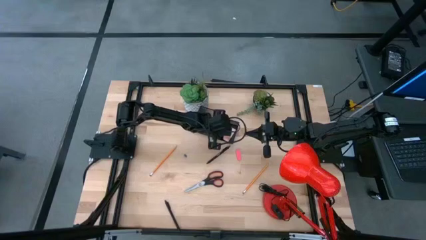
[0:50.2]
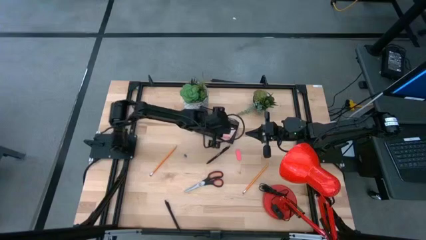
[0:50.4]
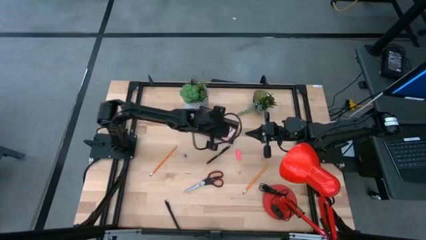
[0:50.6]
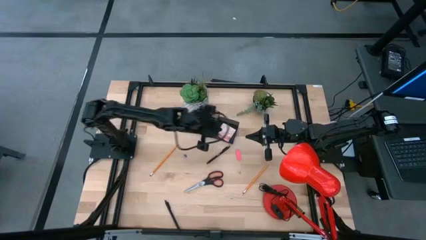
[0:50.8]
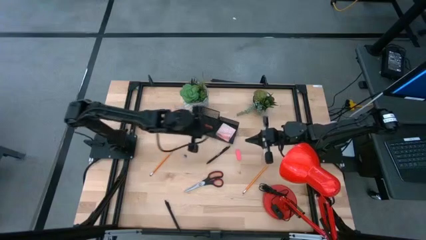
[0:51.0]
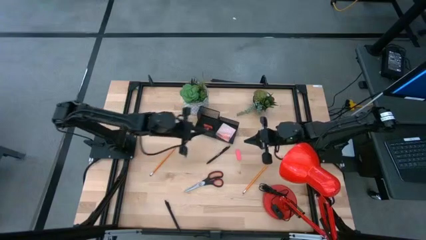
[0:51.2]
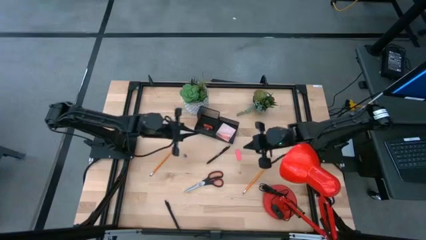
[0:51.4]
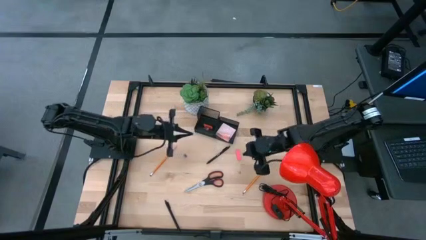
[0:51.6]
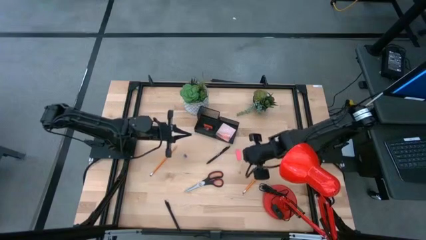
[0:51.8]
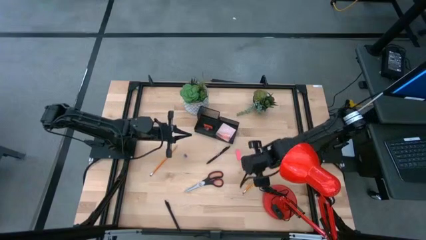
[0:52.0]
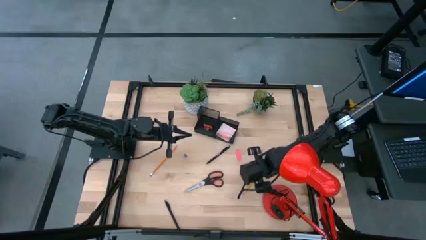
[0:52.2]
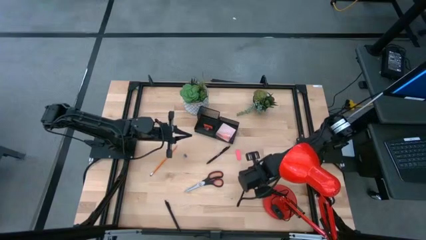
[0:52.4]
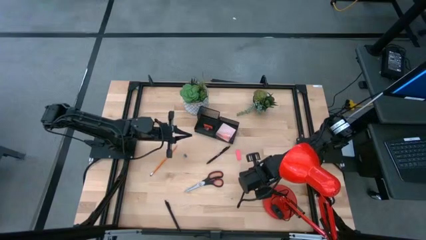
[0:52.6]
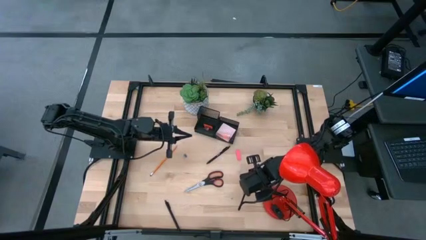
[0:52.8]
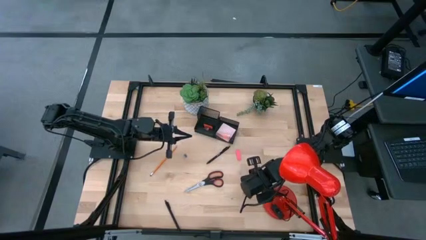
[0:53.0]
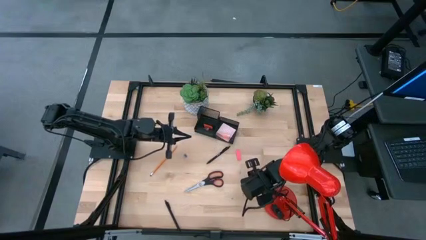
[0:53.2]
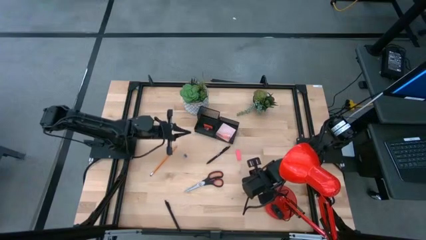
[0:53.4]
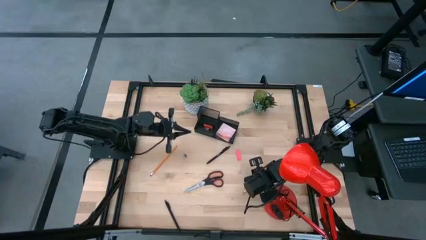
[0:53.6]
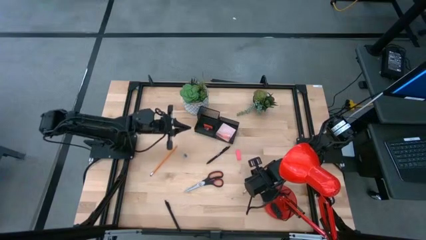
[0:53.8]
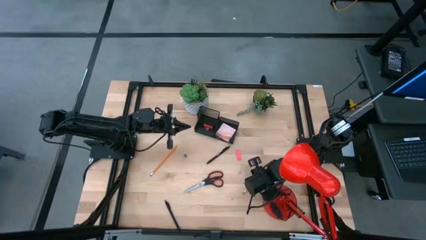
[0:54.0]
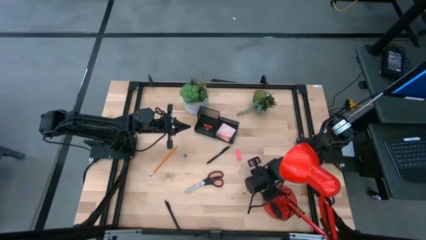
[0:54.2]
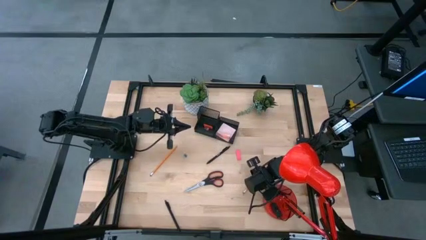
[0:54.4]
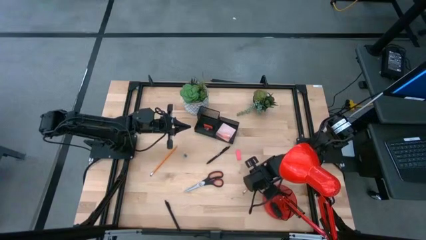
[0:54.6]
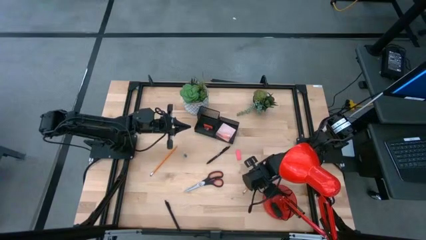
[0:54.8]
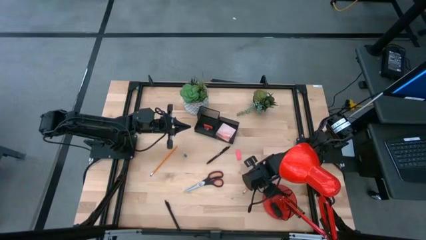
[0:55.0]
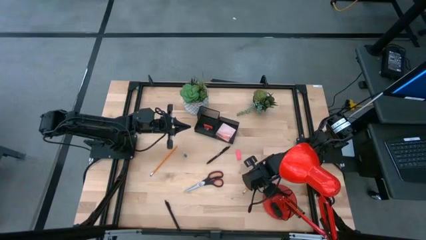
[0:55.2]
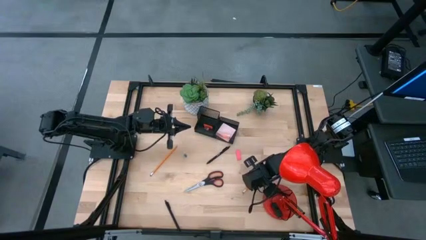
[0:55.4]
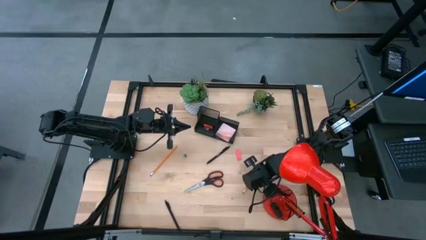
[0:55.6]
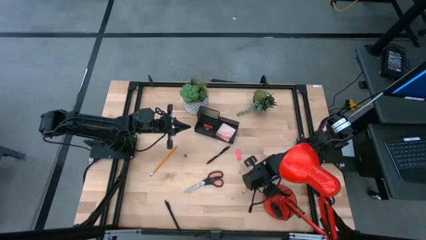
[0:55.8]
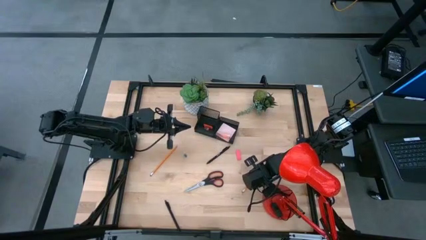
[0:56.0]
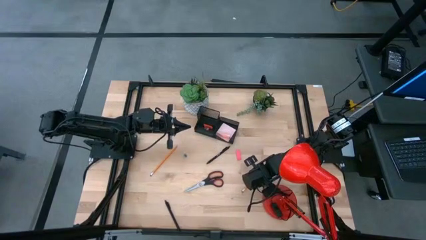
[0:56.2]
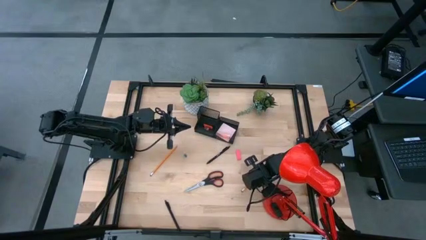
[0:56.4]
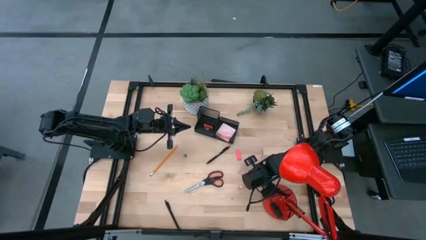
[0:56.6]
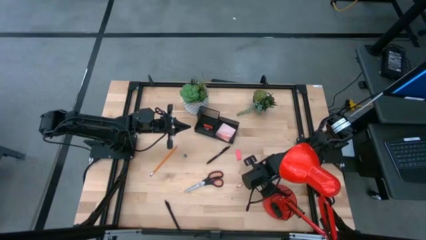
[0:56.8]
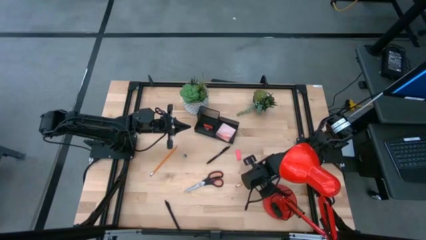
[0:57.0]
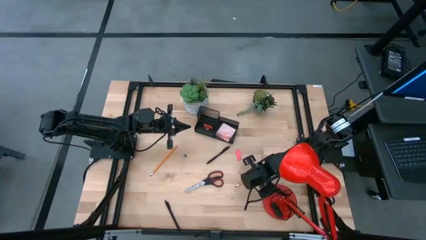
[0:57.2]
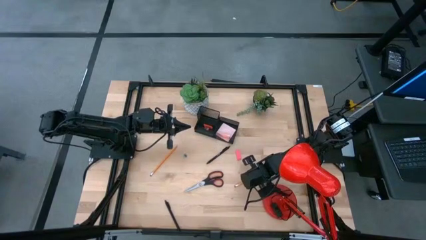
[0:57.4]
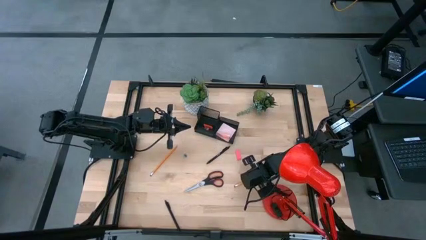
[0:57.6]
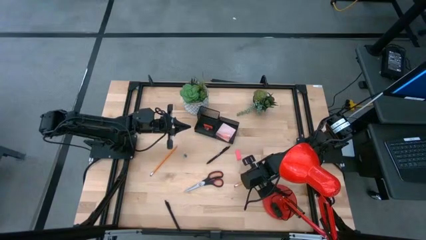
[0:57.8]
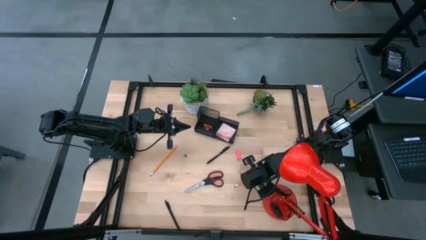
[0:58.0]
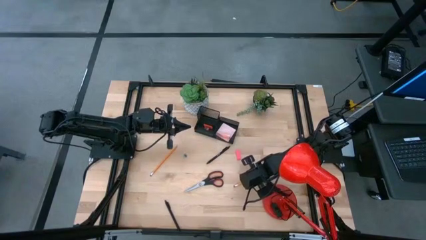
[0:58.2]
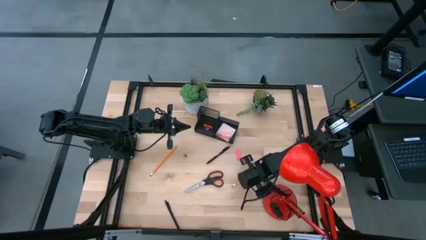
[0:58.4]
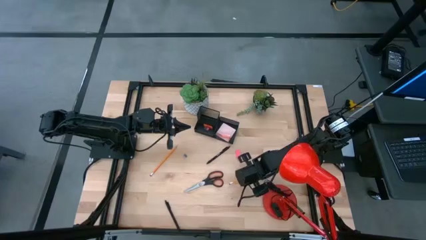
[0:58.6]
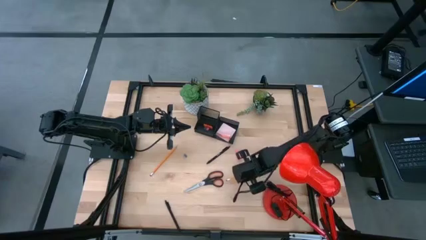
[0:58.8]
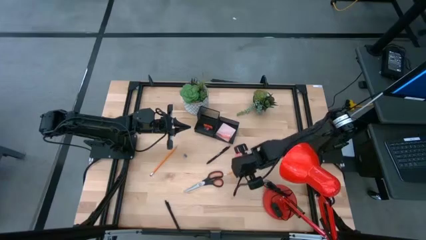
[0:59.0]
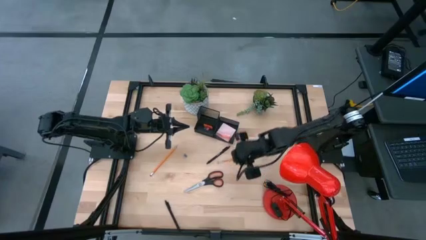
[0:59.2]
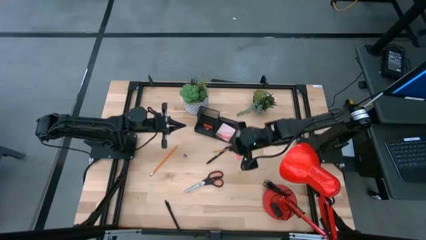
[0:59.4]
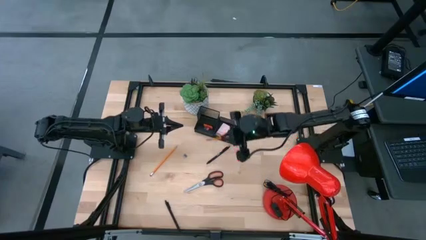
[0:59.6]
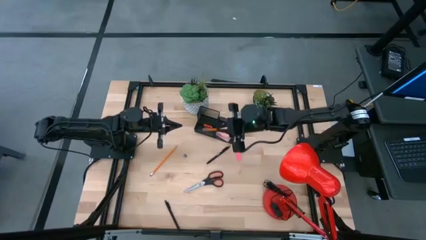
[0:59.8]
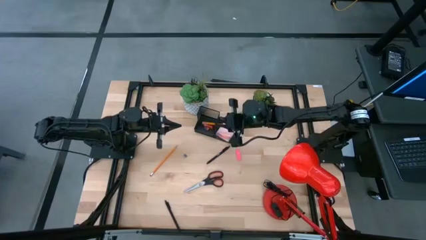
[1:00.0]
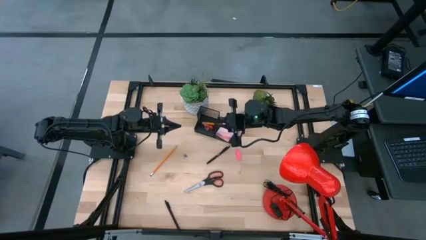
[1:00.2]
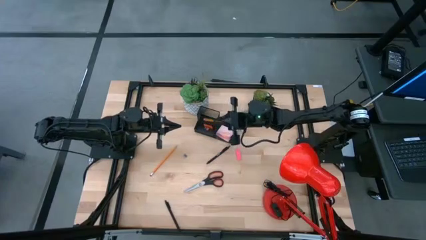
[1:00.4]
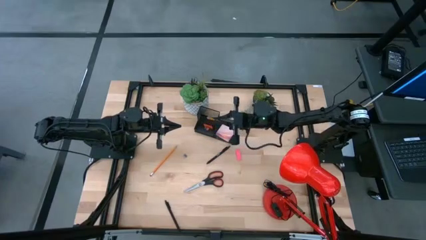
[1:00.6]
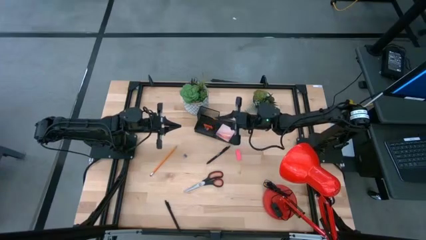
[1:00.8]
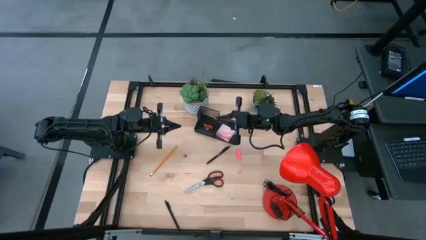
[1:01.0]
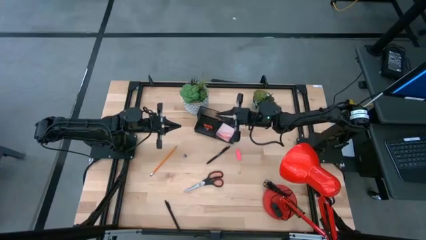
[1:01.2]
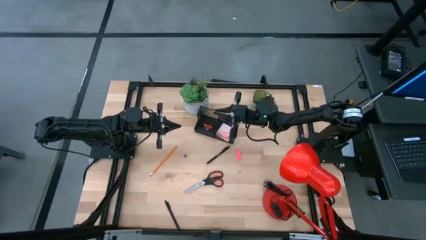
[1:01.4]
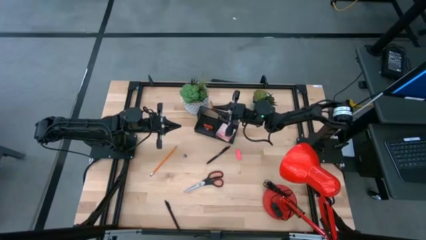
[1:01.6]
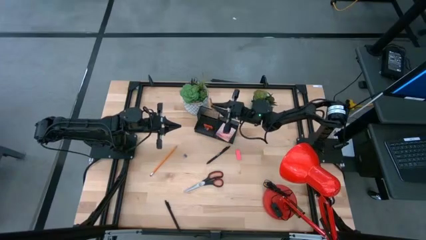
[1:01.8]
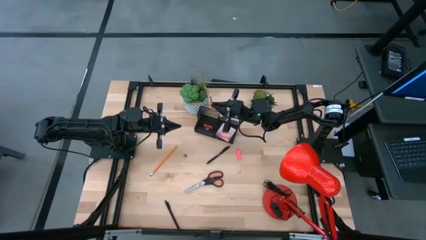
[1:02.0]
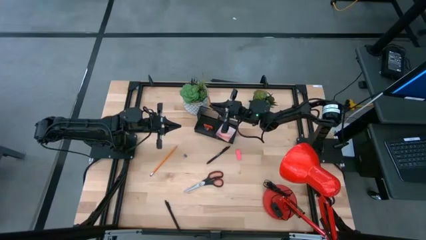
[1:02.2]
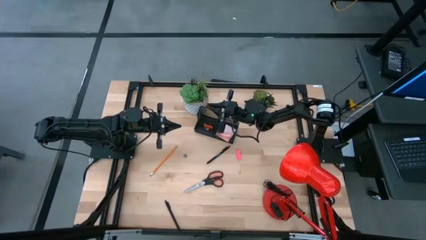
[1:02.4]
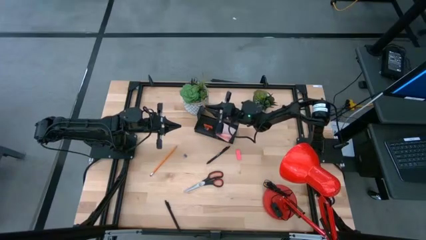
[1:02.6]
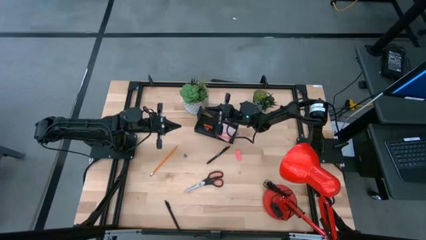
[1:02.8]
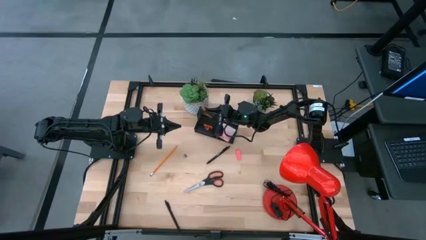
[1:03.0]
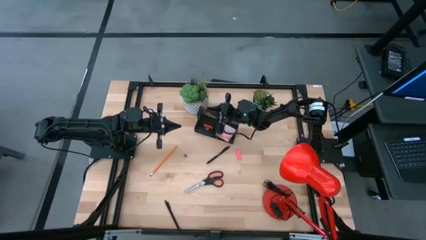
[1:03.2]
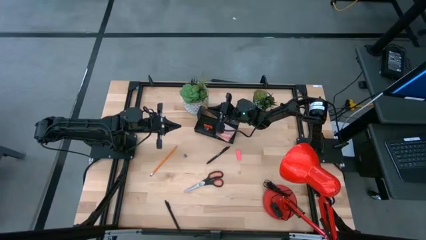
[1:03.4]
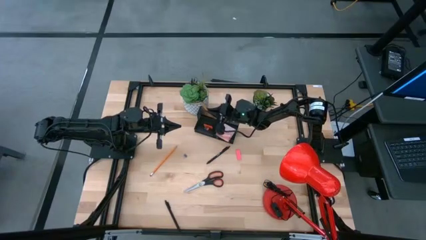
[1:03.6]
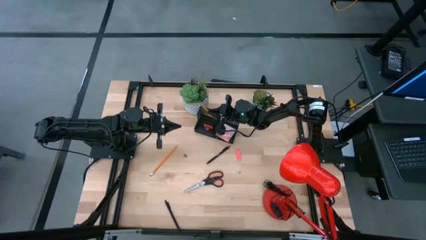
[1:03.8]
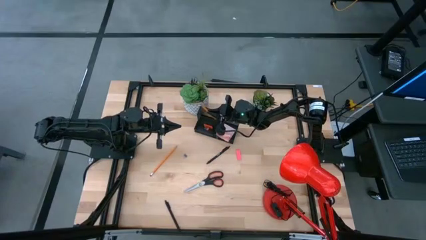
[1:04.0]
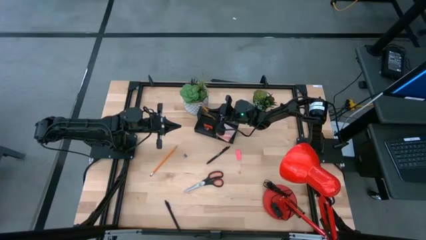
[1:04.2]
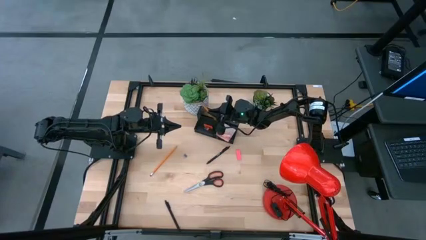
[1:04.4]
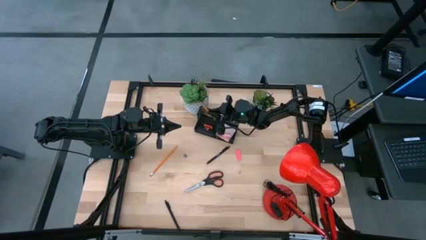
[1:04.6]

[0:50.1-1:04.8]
Task: Pick and place office supplies into organizer
Put the right orange pencil into the black desk organizer

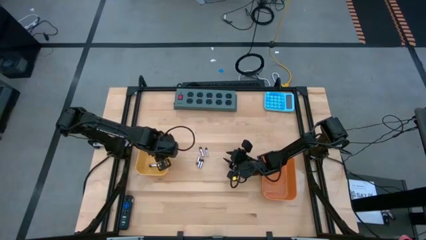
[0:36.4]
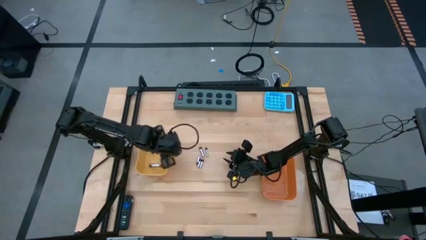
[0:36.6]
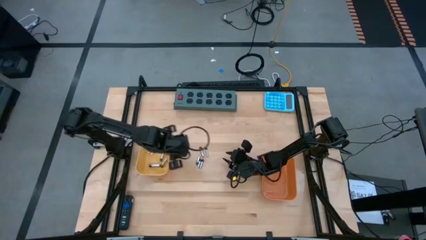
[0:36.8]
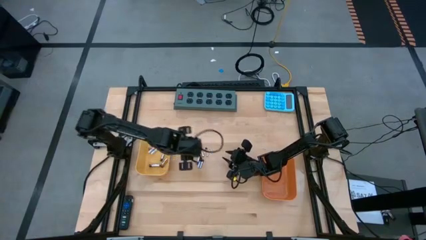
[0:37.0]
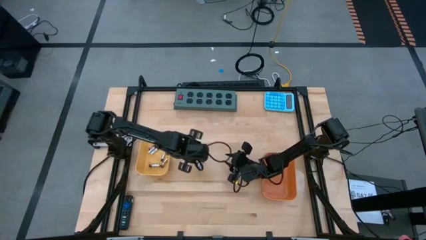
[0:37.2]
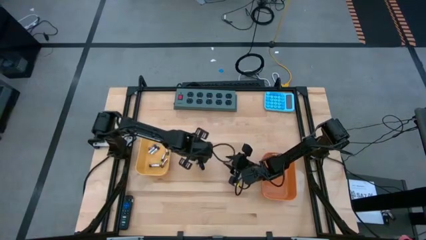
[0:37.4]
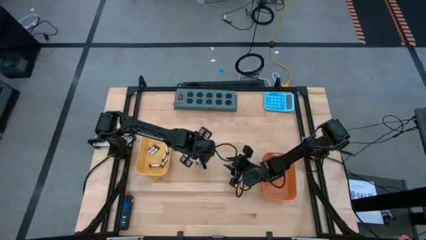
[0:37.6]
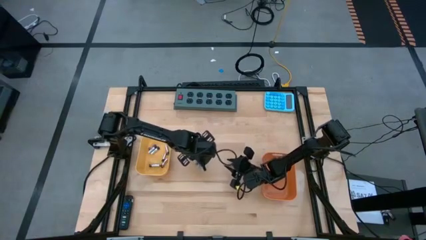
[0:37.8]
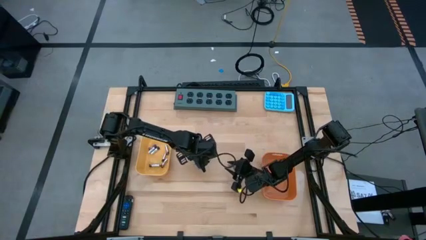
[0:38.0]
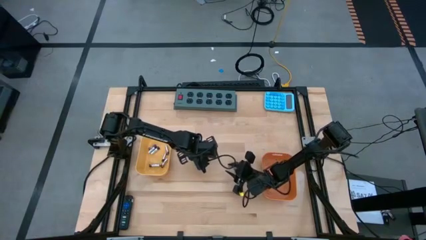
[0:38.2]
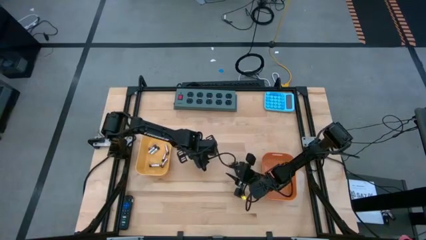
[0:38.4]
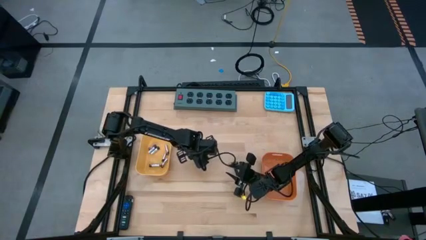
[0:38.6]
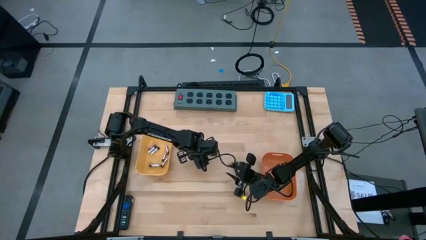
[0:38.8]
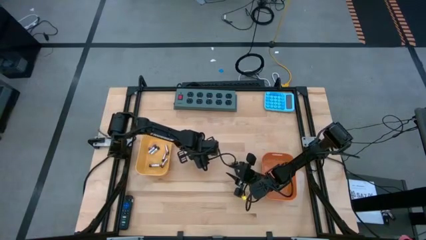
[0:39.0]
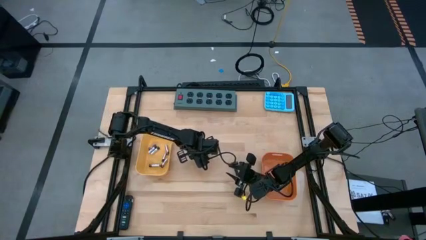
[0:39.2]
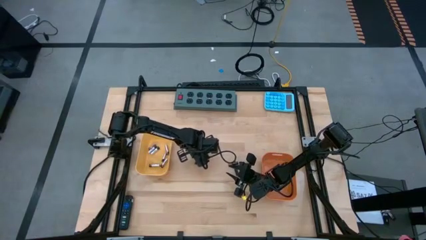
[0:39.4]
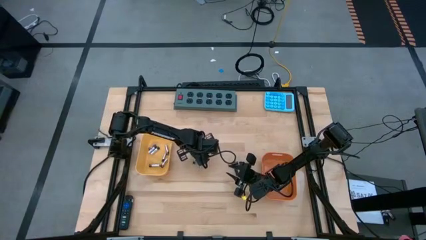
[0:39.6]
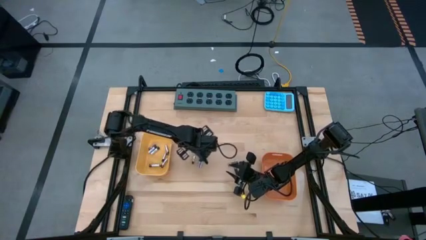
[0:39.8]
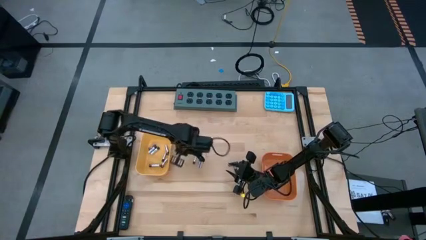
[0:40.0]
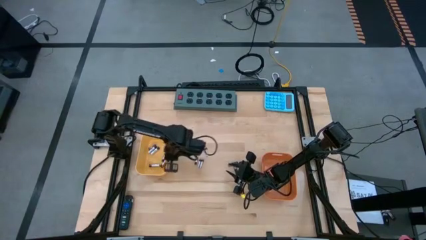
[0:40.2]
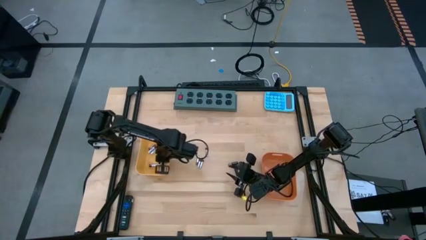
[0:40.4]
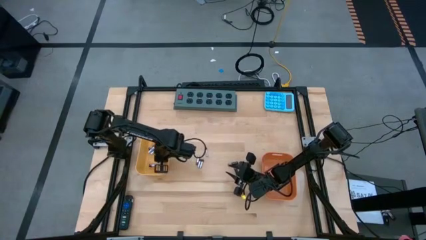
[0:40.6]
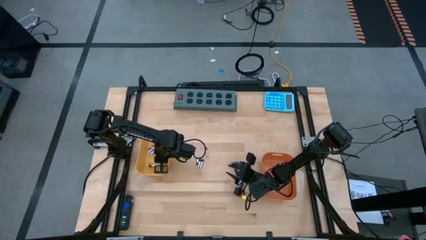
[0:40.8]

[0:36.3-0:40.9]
Task: Sort batteries
Put the silver battery into the yellow bin
